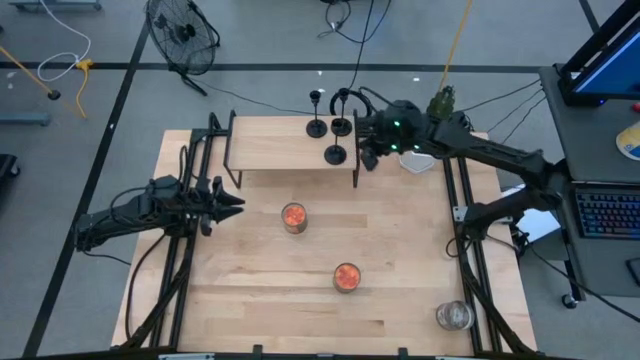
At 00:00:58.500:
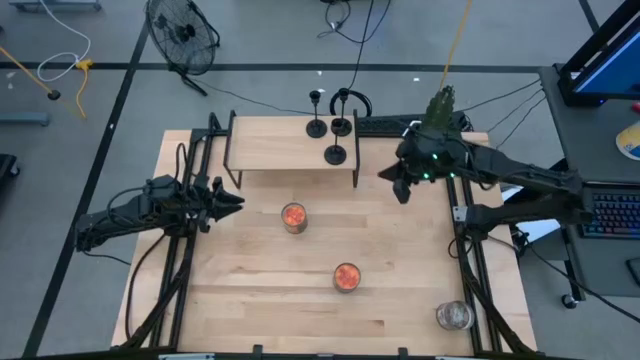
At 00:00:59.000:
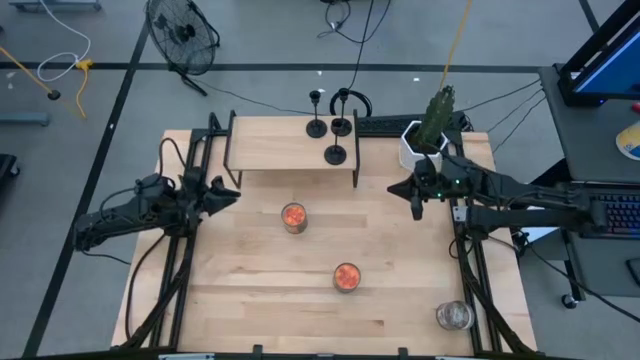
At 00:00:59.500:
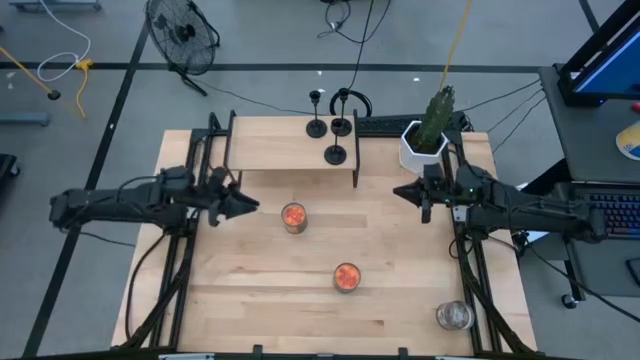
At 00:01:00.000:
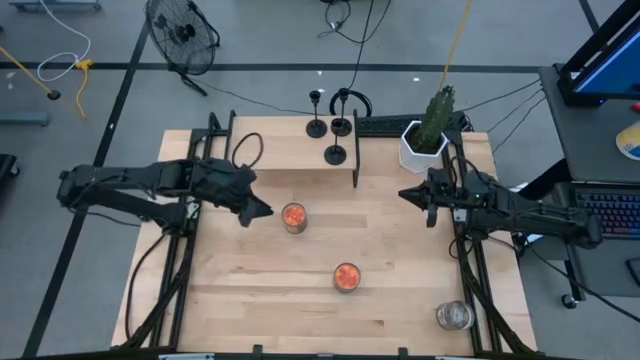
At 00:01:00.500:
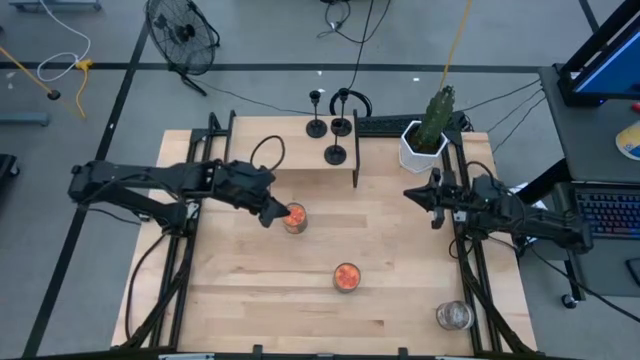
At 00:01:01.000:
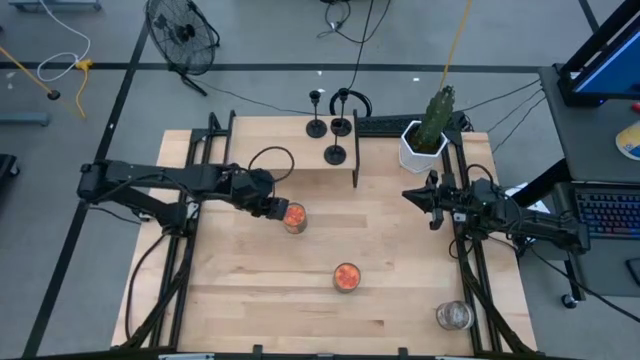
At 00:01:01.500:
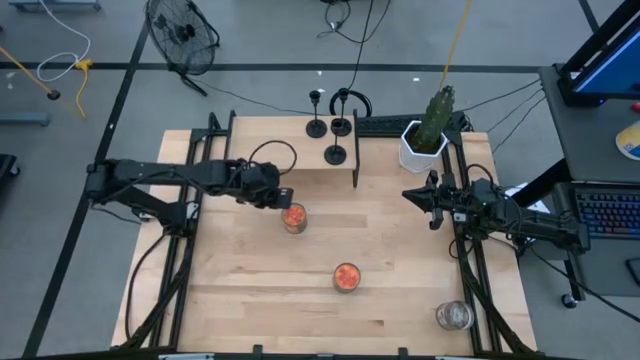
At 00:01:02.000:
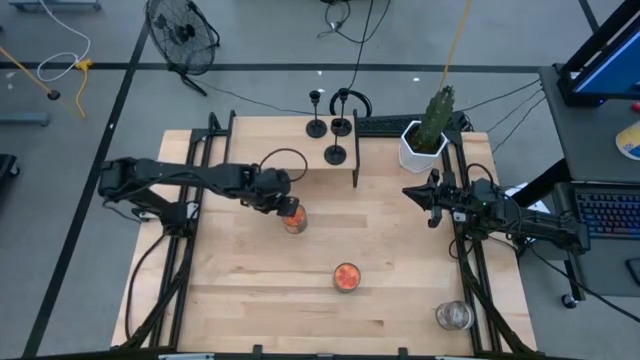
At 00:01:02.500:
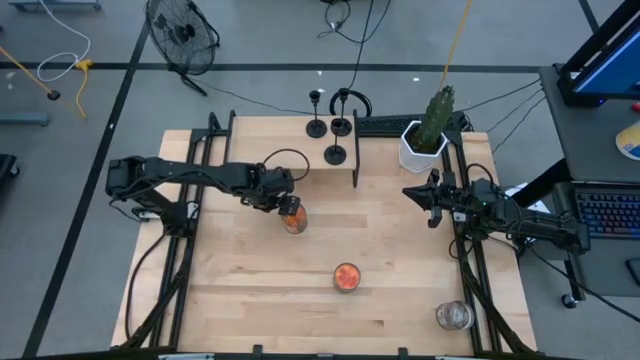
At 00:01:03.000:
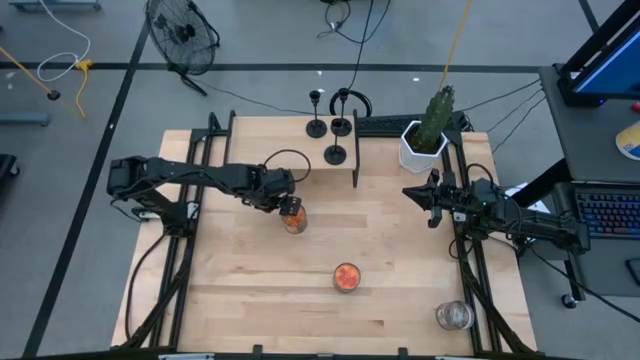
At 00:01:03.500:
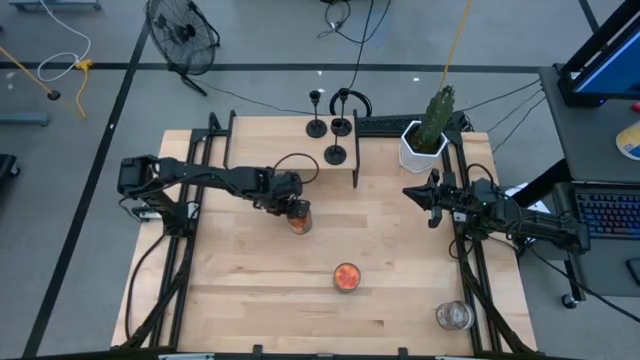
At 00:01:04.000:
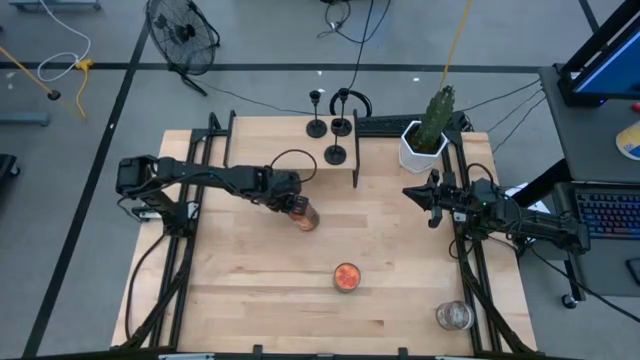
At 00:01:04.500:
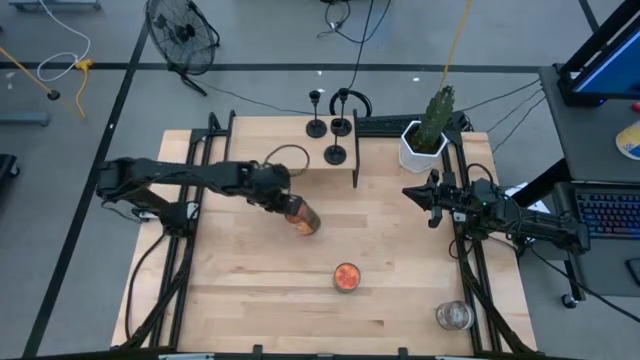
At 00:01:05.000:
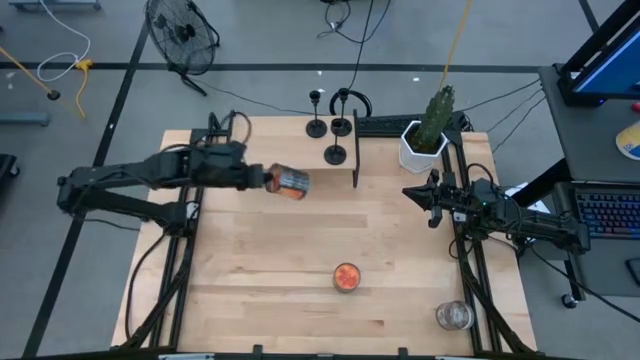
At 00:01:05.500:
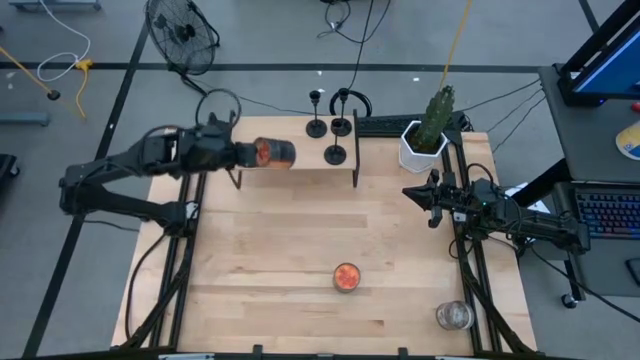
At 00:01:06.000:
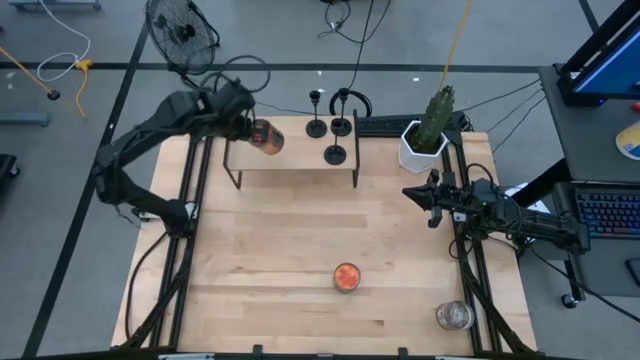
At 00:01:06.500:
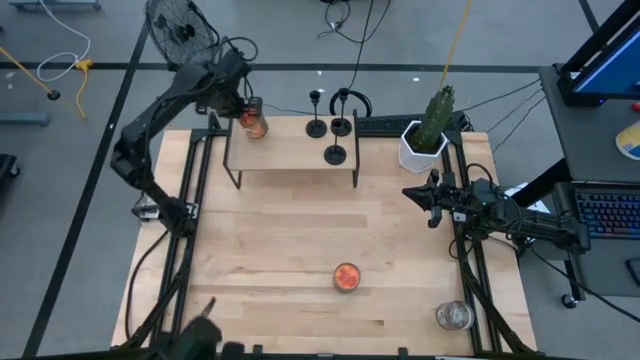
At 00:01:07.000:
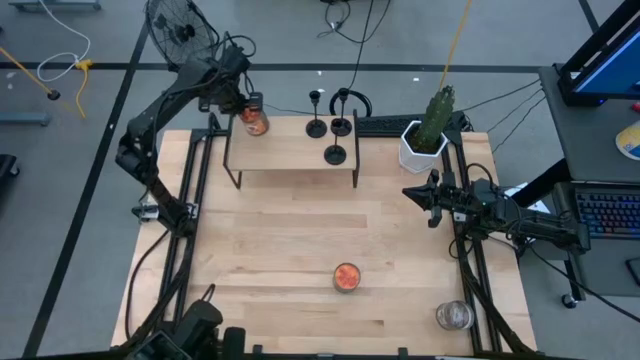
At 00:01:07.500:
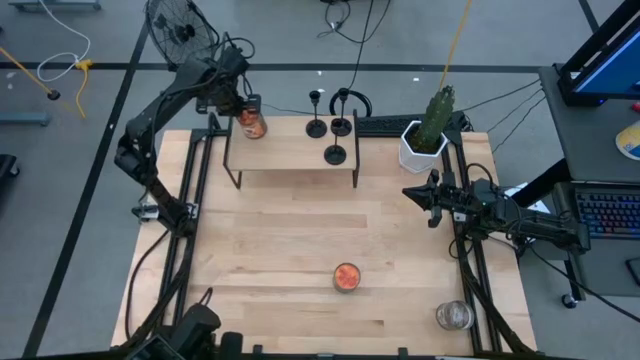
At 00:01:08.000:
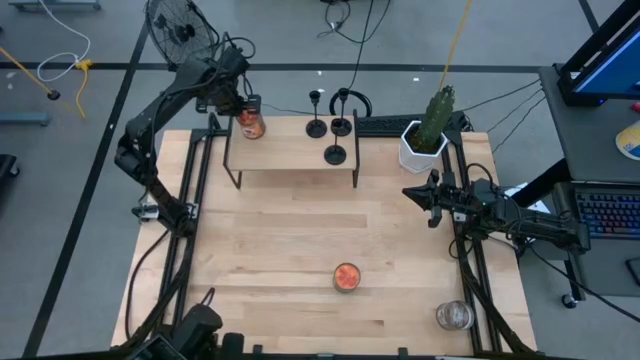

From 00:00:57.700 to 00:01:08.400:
Task: Pick & Place candle stick holders
Put the top orange scented candle on the shelf

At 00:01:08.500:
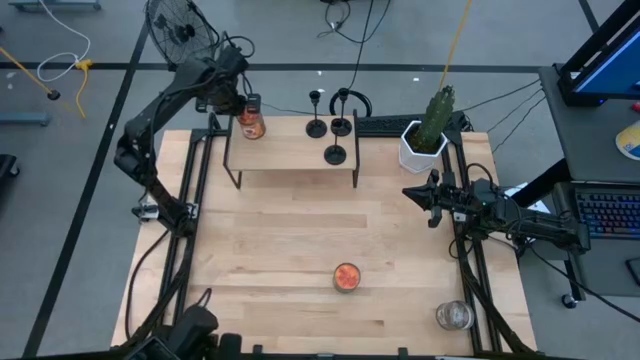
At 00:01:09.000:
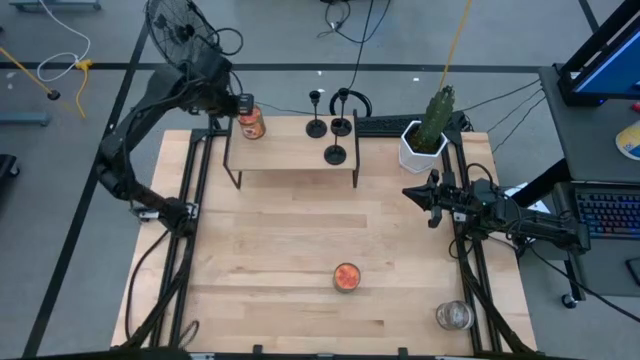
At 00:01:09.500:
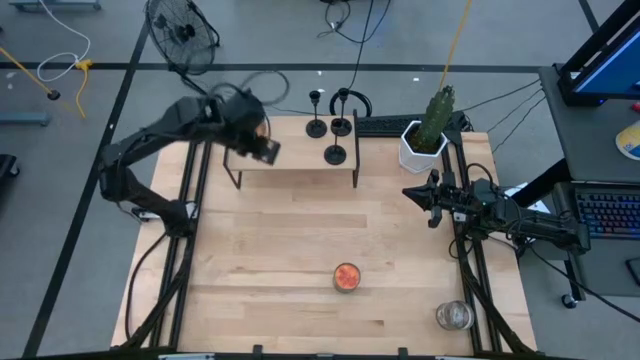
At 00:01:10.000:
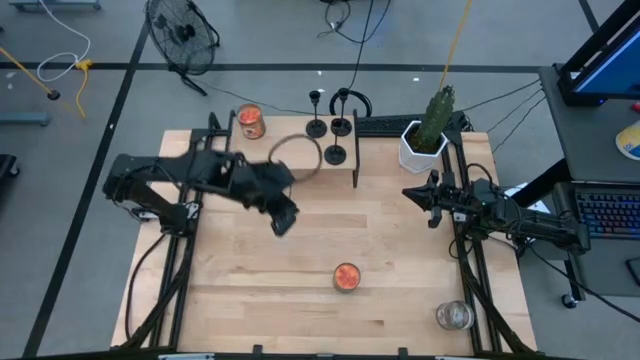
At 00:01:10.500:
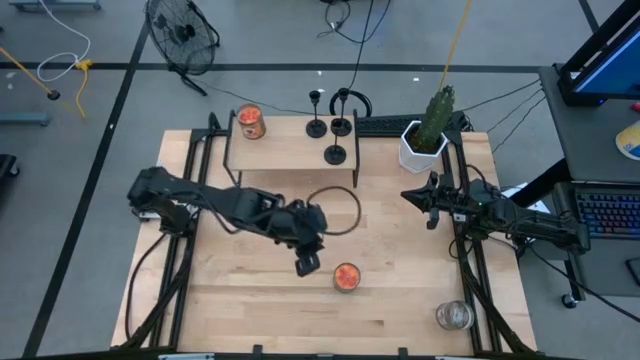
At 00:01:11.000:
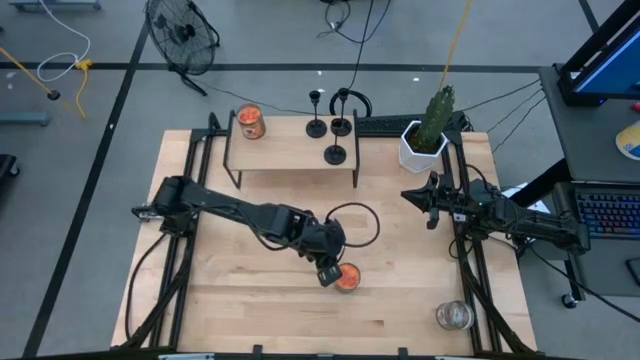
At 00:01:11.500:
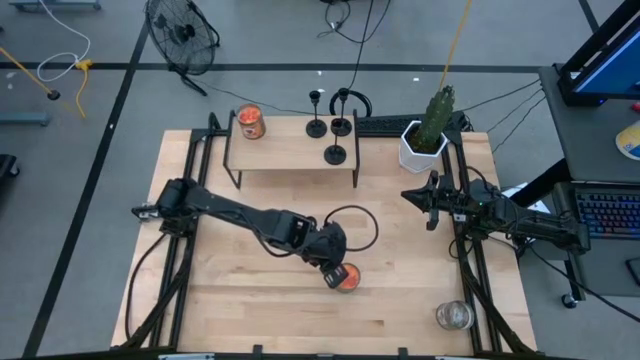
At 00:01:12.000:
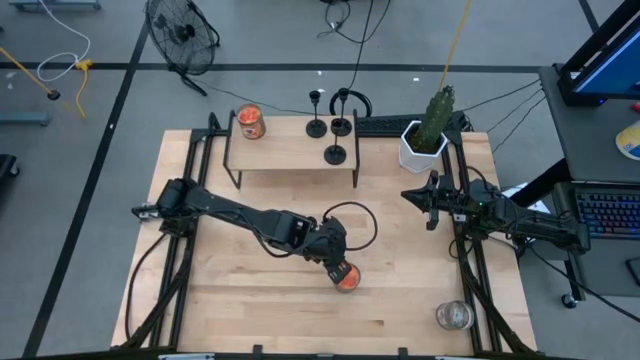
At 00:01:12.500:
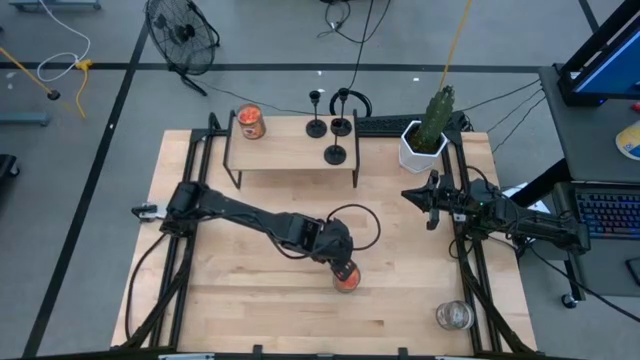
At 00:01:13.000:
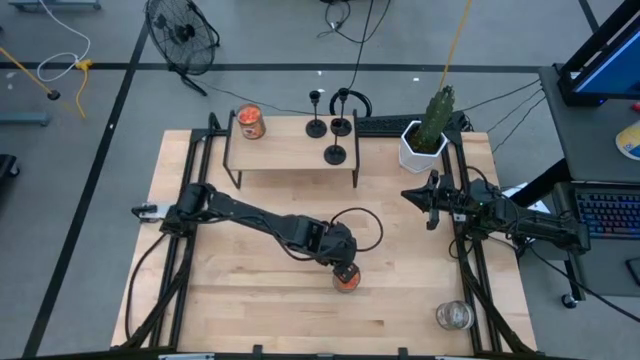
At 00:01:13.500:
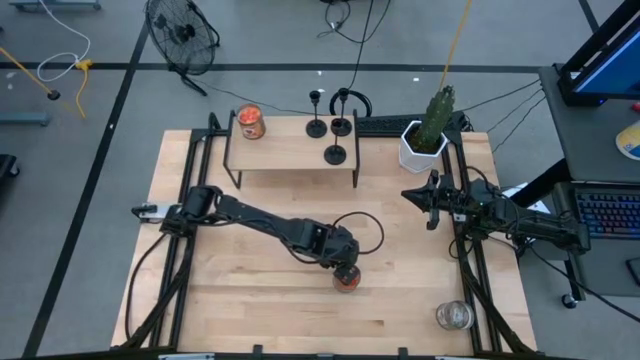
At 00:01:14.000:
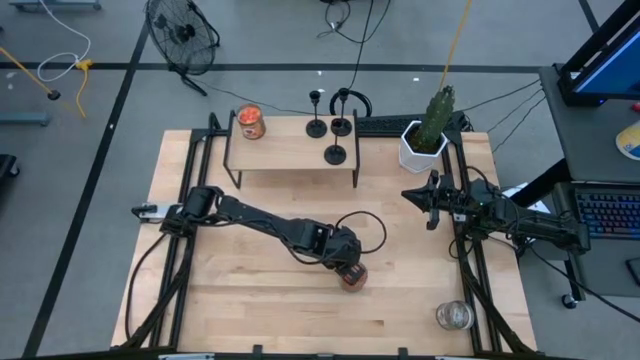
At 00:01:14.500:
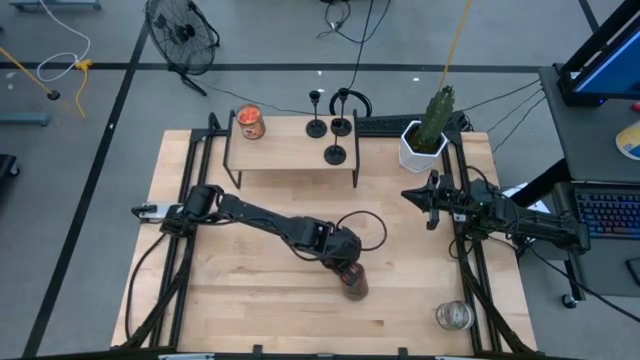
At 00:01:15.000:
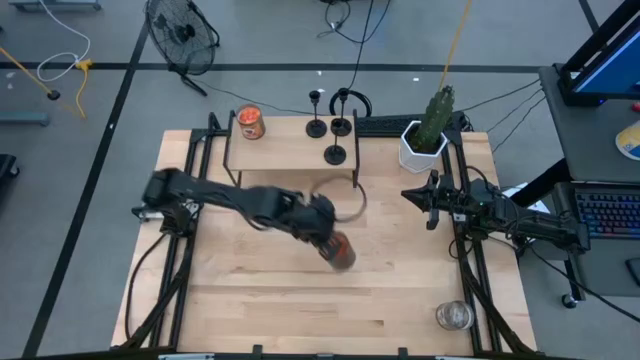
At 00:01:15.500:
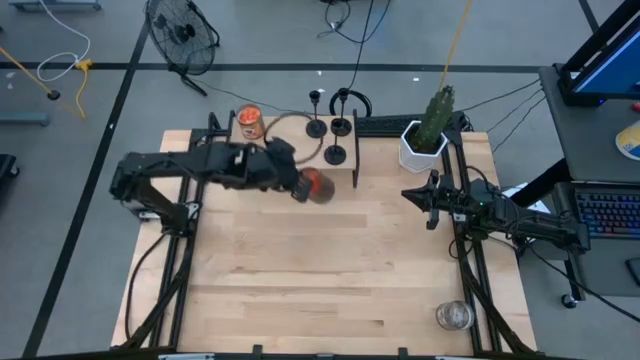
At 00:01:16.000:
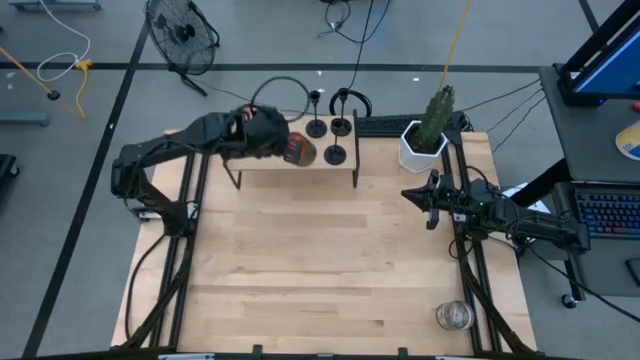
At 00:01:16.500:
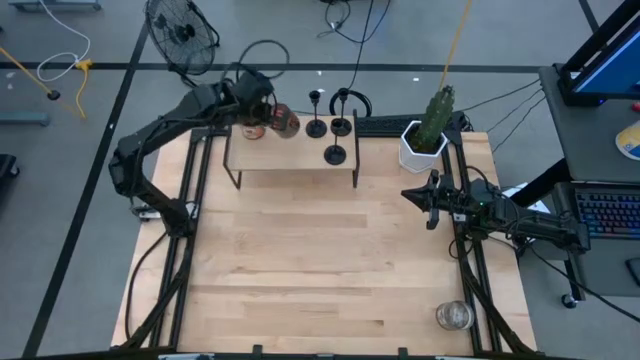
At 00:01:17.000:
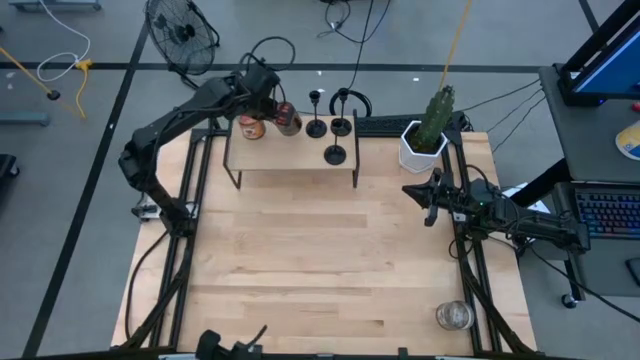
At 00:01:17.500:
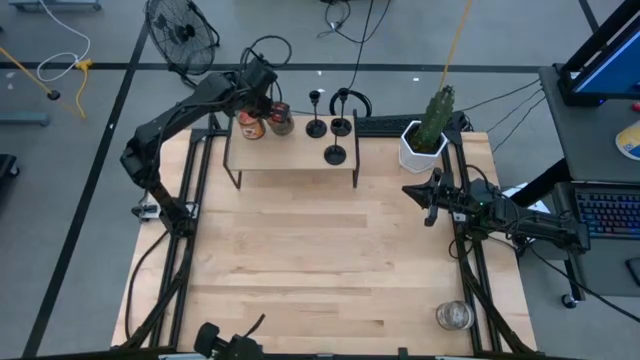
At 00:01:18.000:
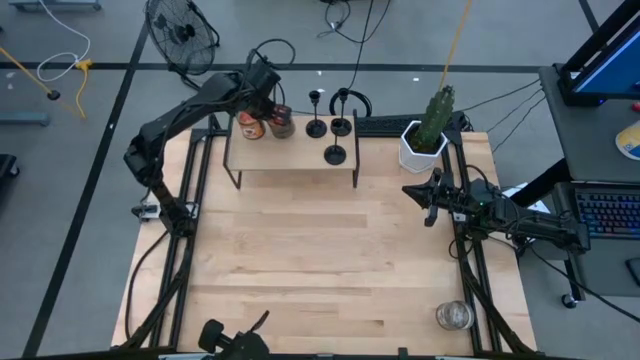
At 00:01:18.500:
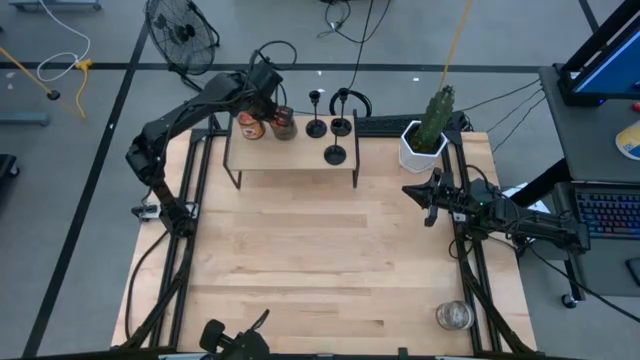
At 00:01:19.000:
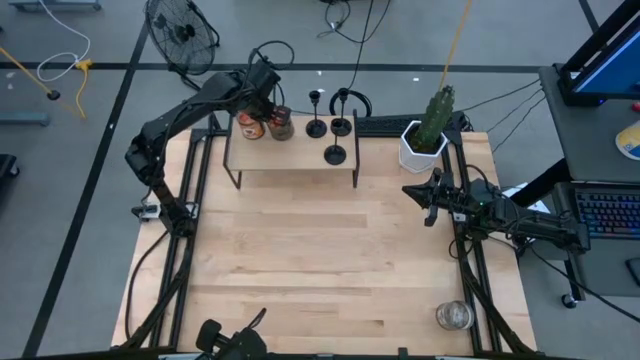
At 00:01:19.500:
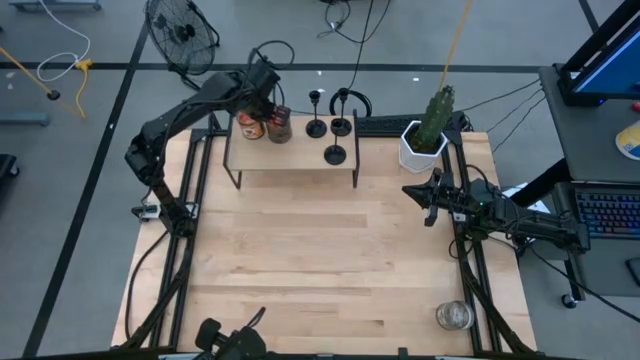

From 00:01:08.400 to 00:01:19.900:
Put the orange scented candle on the shelf
